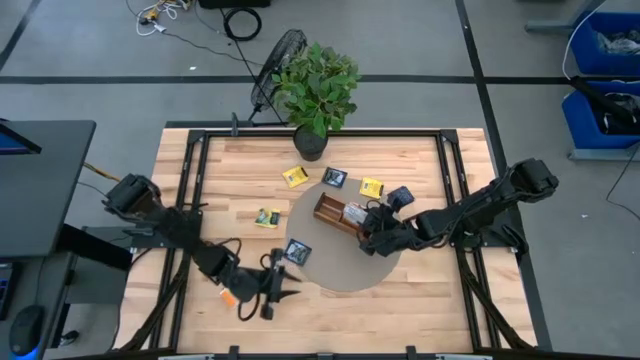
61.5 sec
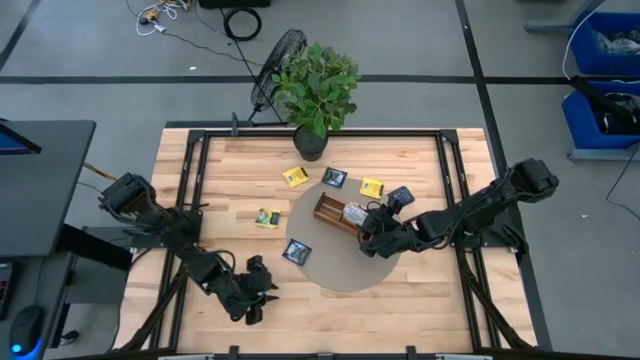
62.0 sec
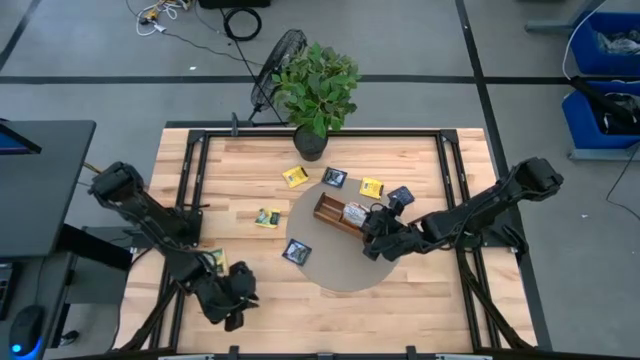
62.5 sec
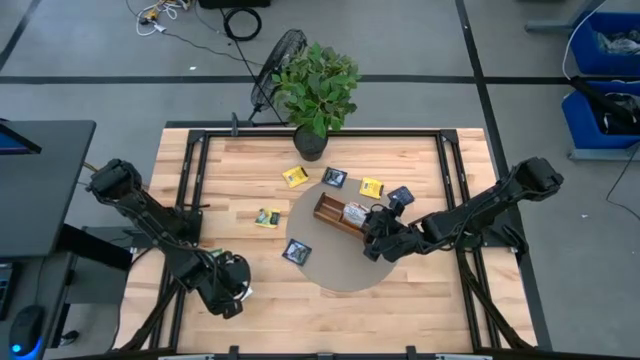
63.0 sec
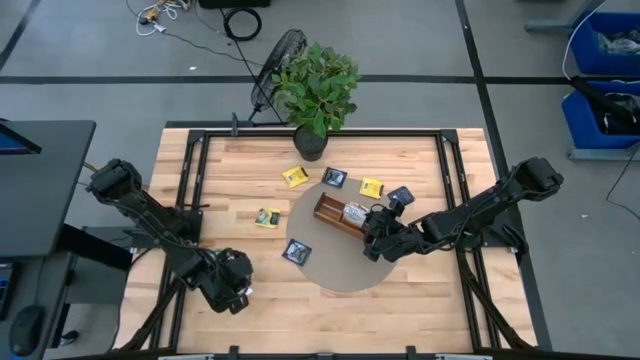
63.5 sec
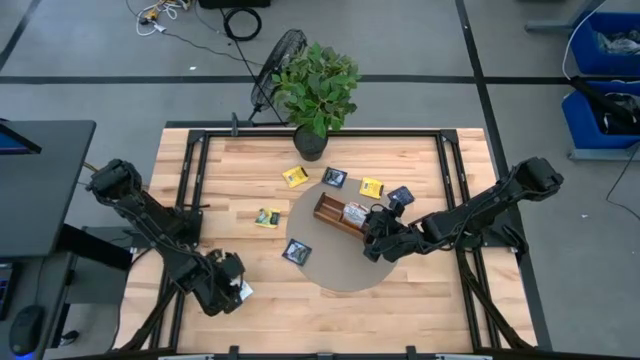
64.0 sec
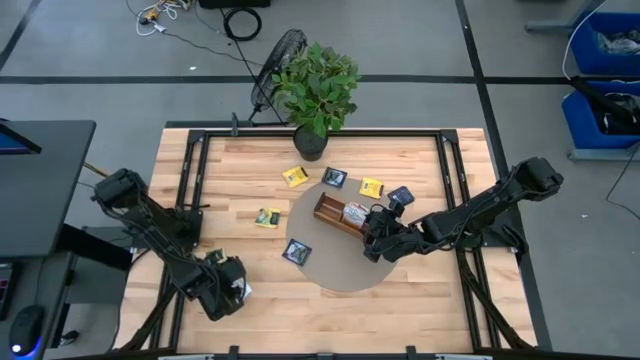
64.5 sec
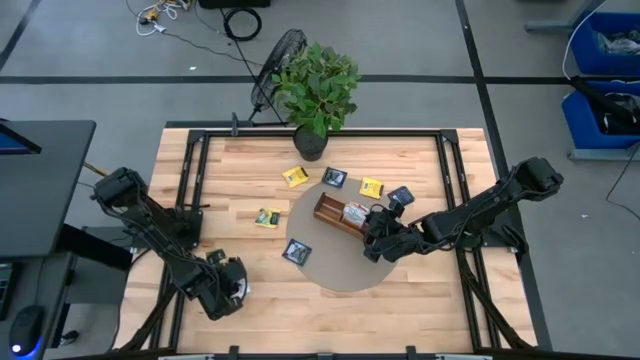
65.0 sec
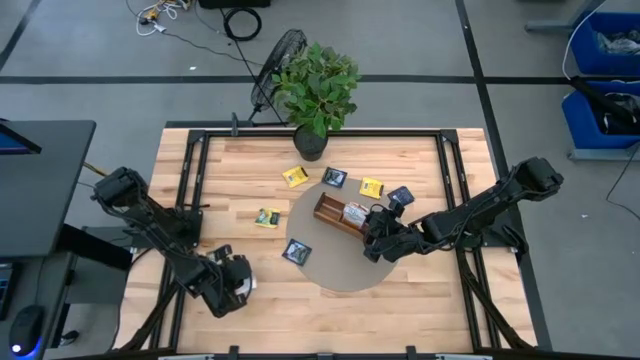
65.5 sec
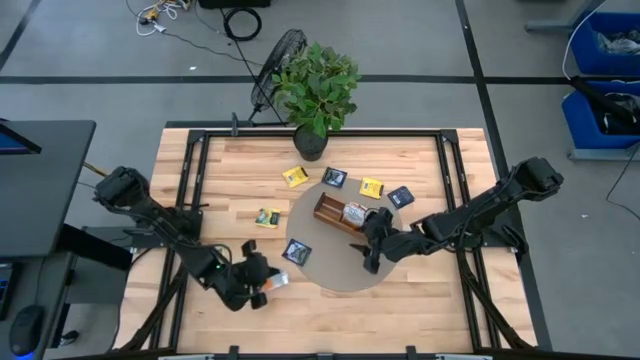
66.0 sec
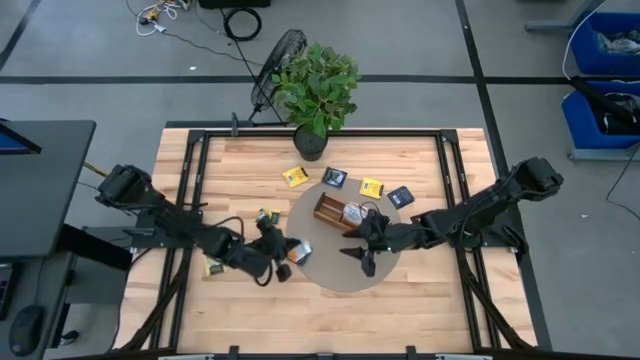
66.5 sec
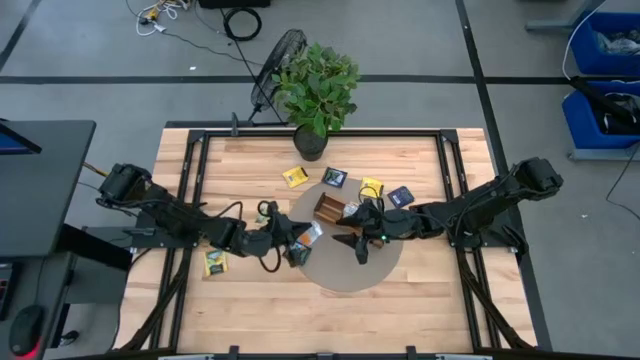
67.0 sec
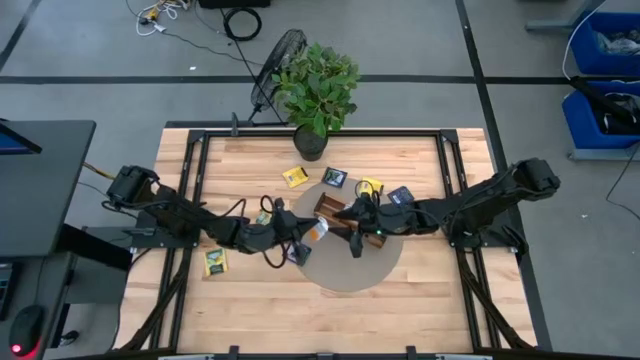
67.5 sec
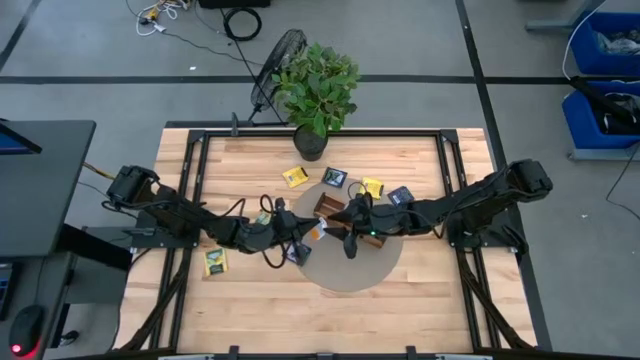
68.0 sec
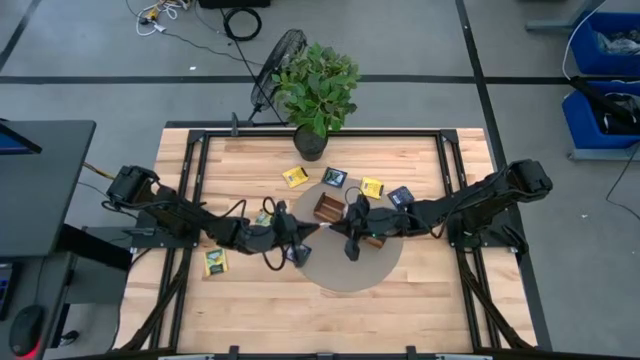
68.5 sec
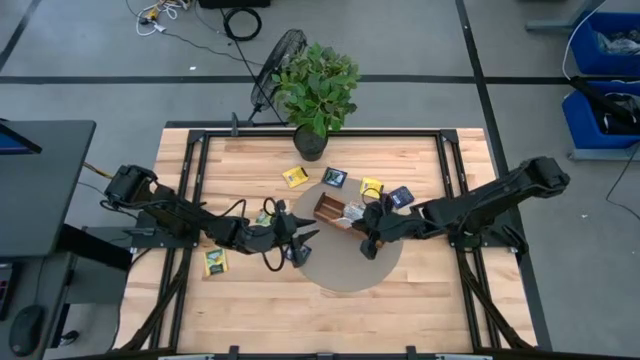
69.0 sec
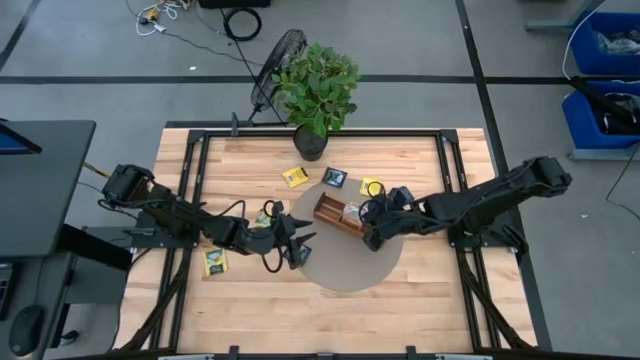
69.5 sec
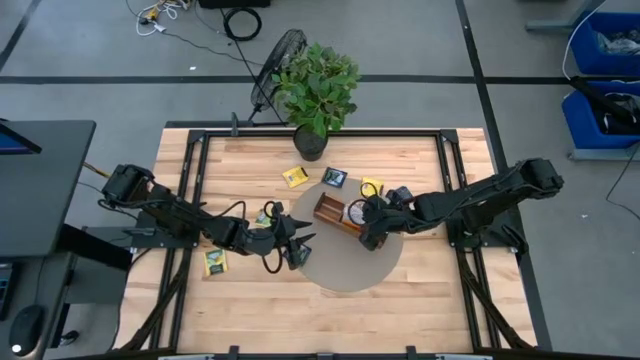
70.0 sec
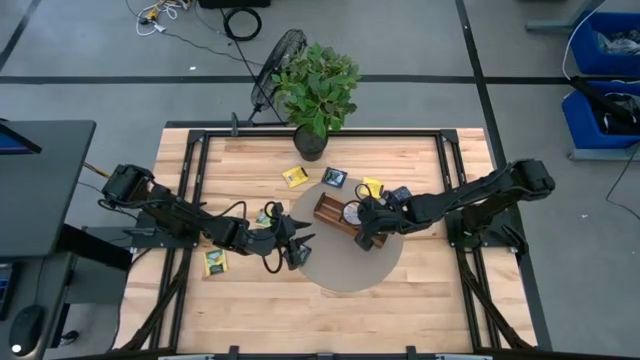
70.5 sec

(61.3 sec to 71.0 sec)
Task: Pick & Place Tea
Put the orange tea bag into the middle section of the wooden organizer

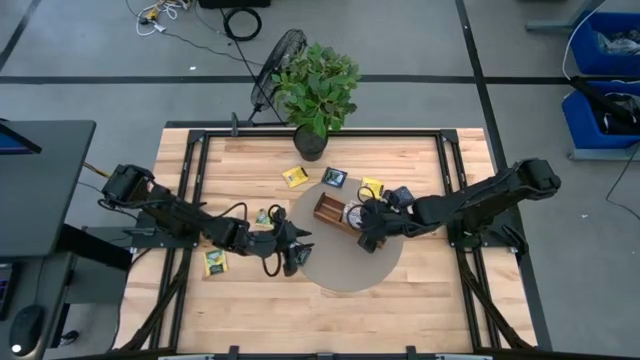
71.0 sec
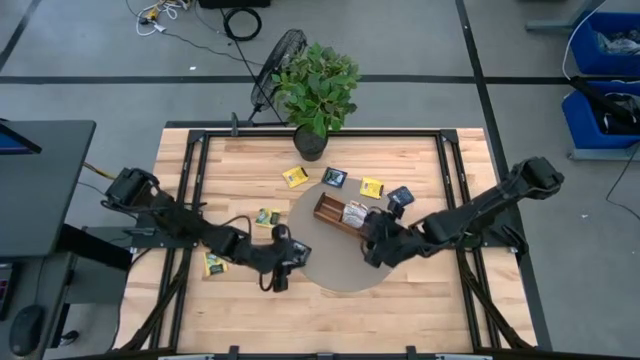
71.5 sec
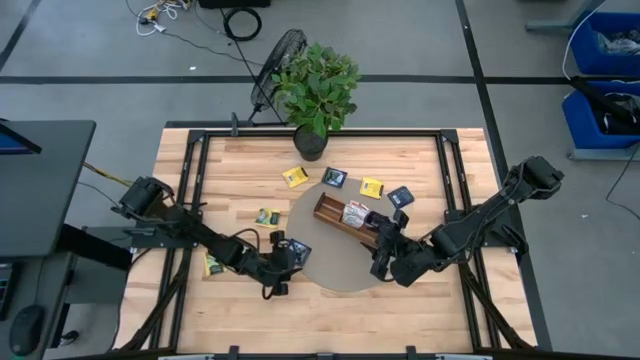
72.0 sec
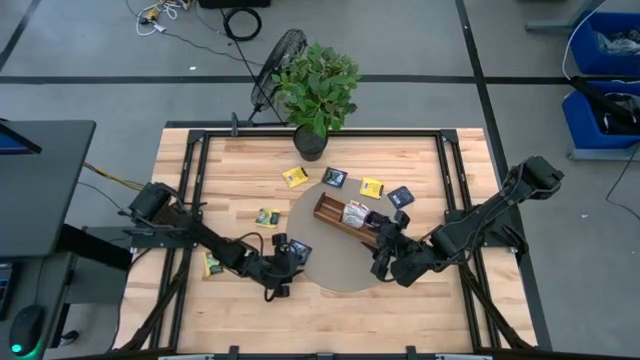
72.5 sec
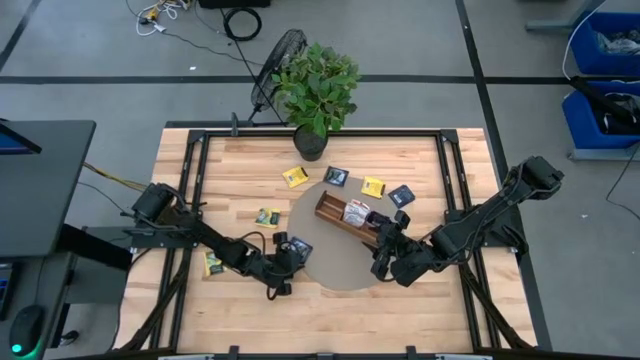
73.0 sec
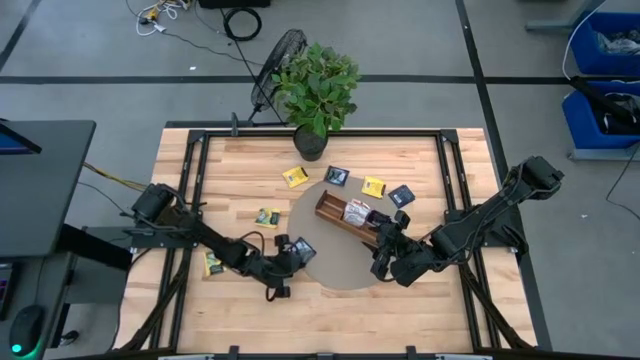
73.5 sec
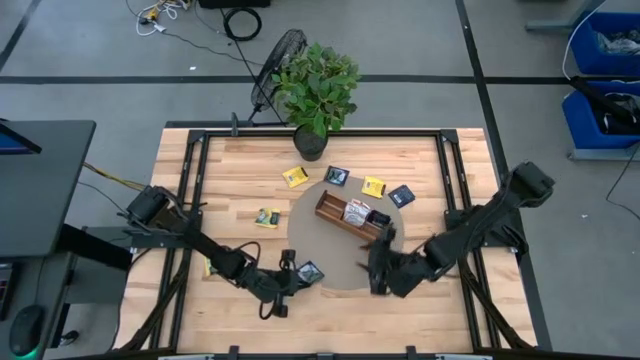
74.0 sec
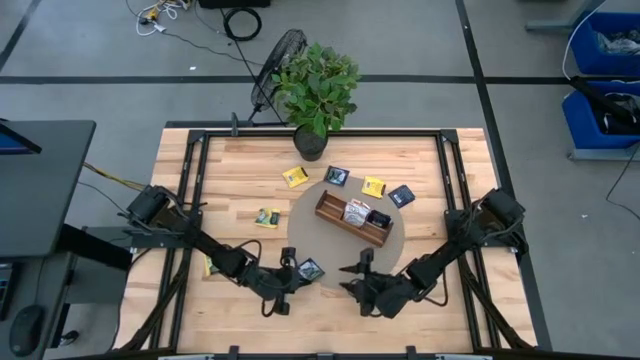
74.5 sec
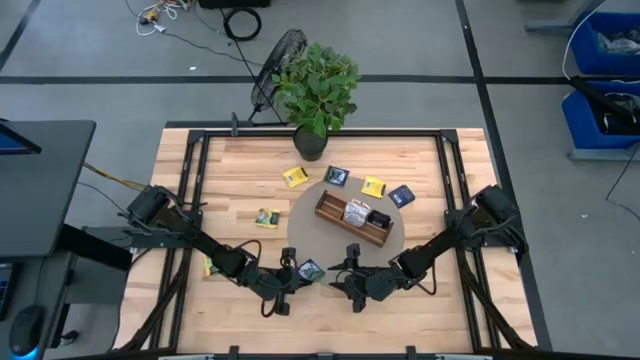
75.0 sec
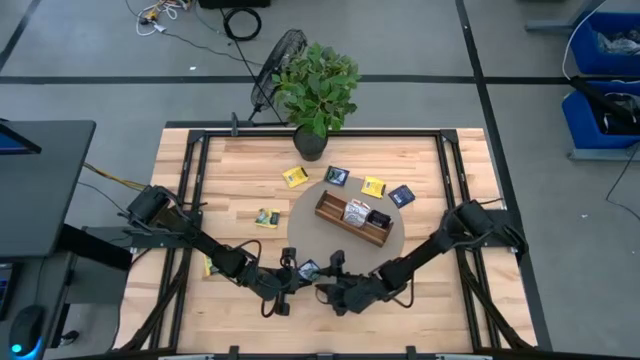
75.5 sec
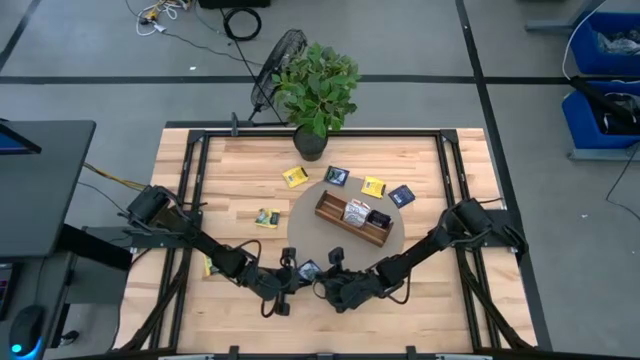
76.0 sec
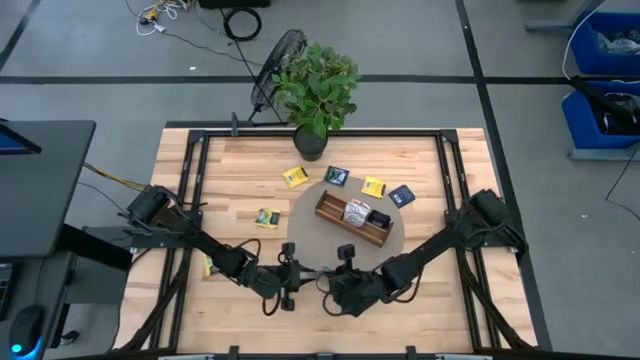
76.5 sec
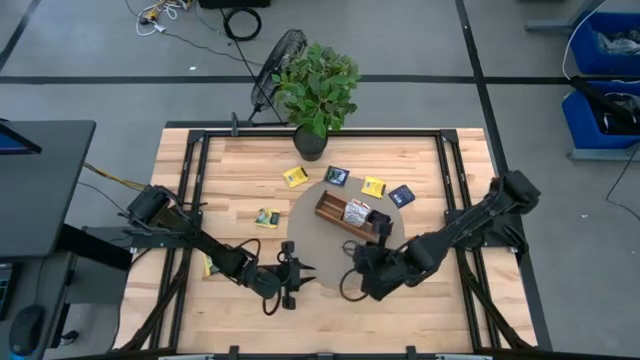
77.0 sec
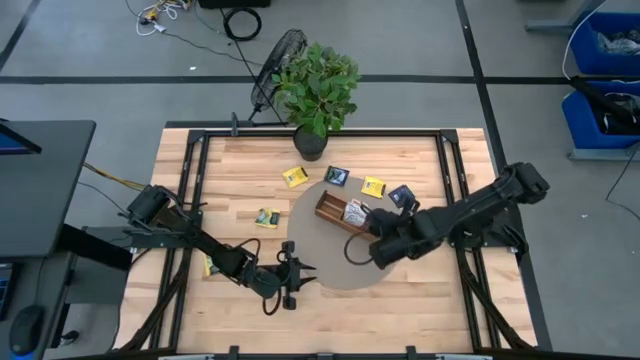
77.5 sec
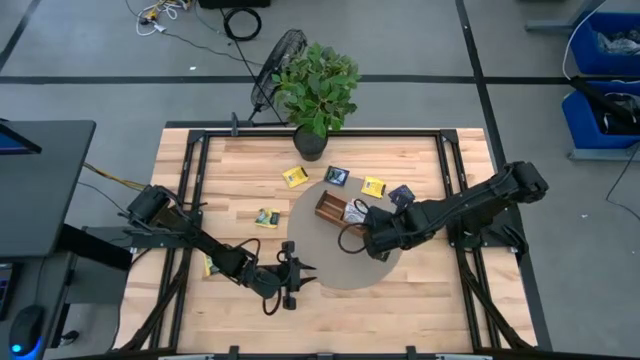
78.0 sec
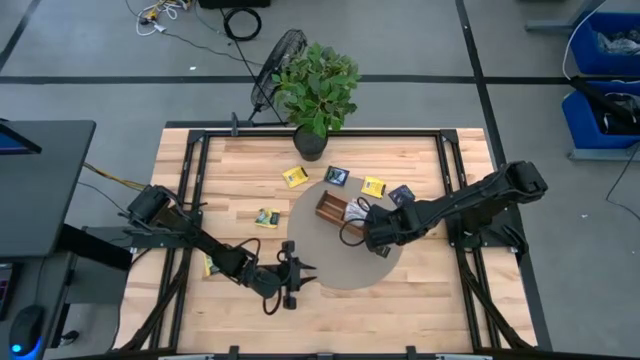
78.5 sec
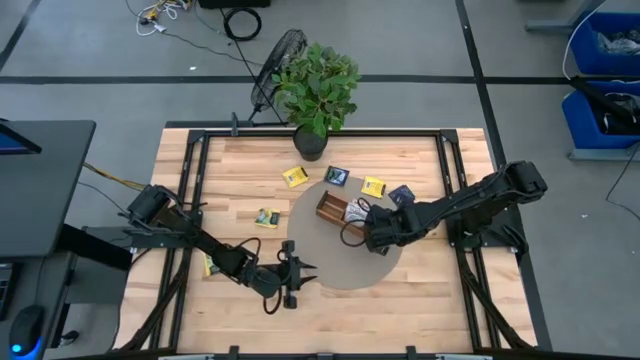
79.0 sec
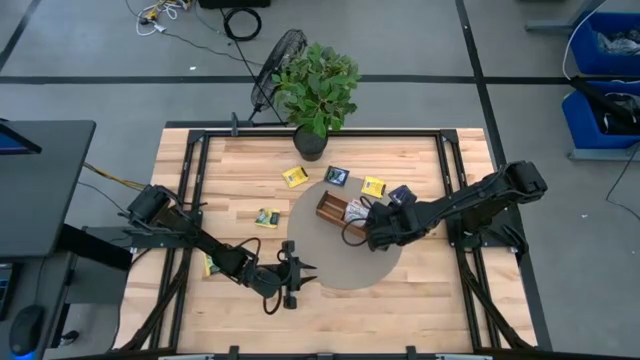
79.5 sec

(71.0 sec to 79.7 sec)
Put the black tea bag into the right section of the wooden organizer

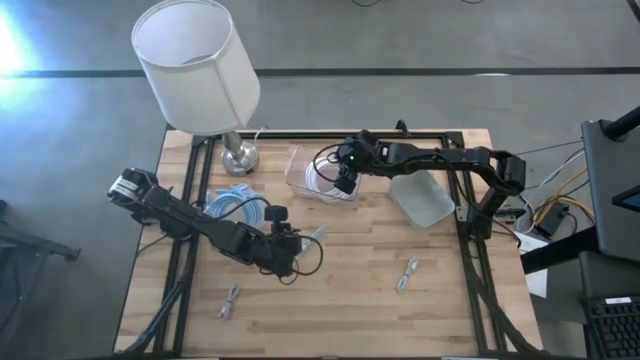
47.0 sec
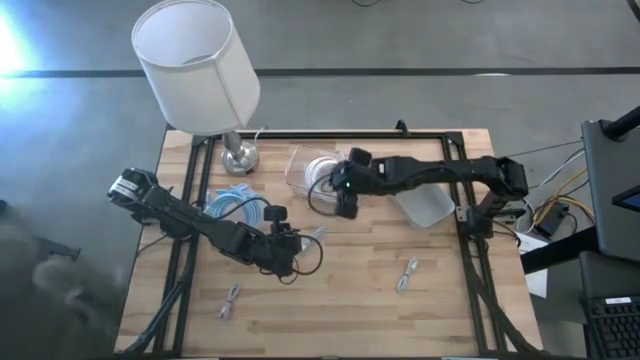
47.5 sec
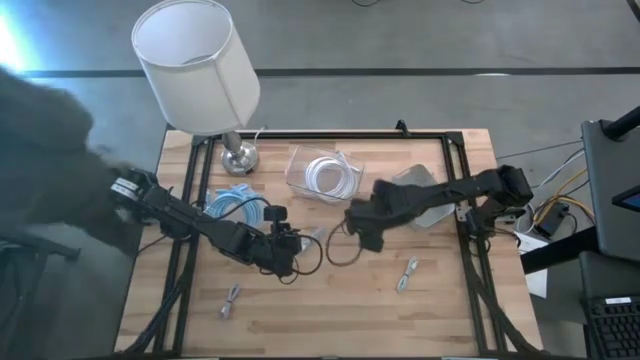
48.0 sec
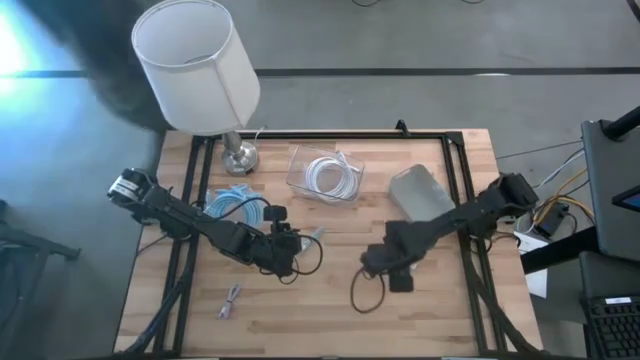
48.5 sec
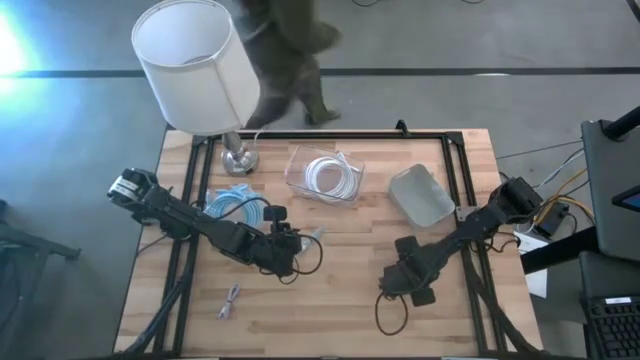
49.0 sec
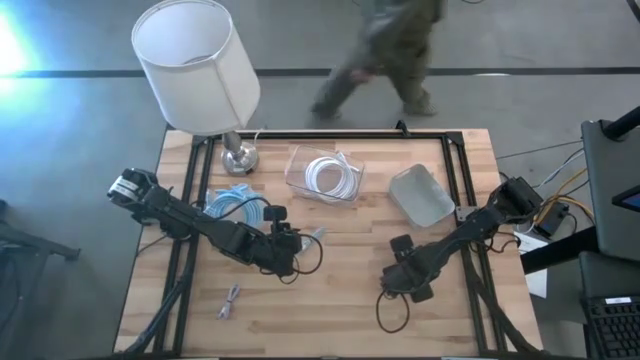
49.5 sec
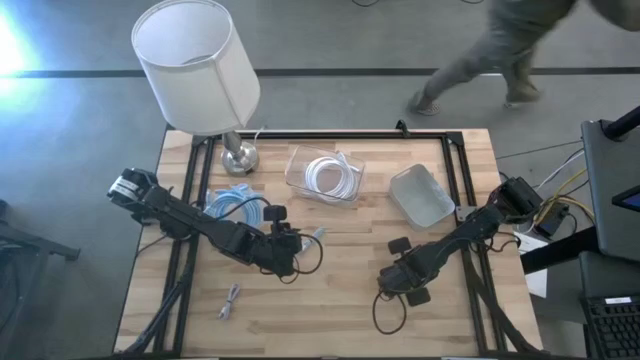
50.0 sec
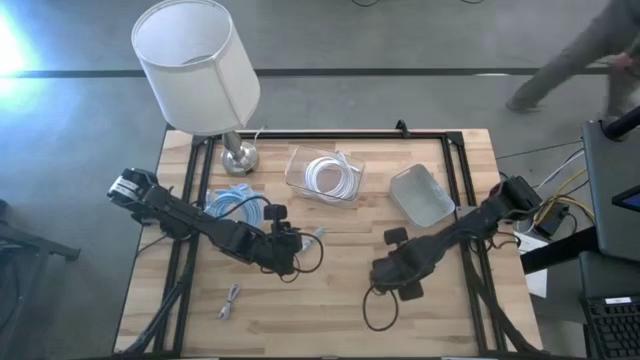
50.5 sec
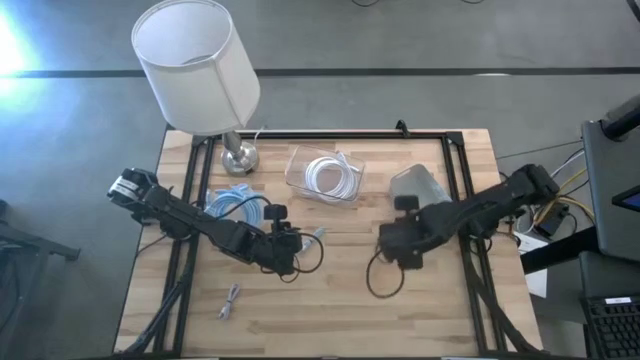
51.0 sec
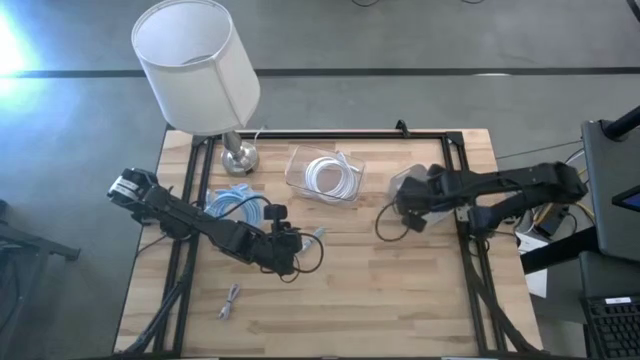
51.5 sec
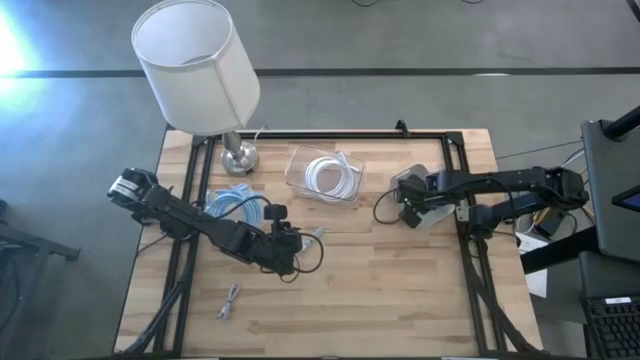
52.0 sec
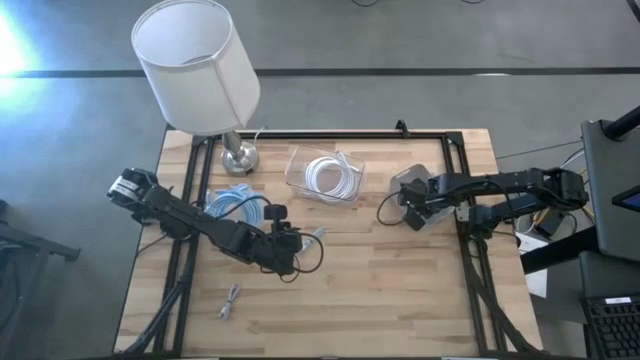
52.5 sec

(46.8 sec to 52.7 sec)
Task: Pick & Place USB Port
Put the gray USB charging cable into the gray bin
